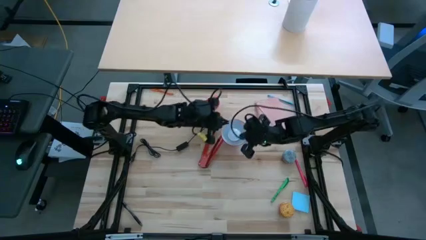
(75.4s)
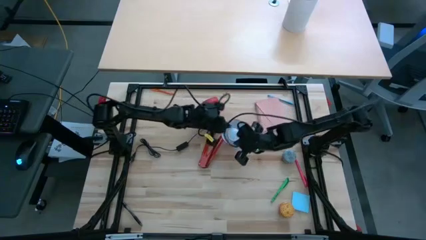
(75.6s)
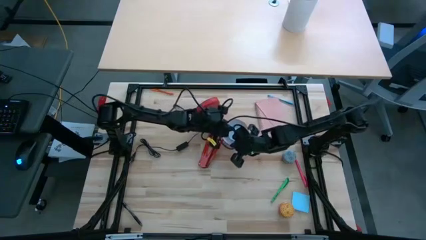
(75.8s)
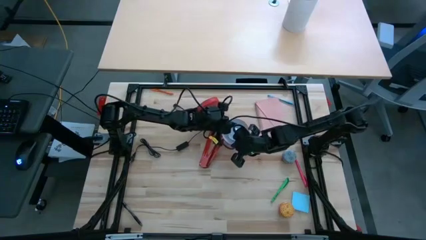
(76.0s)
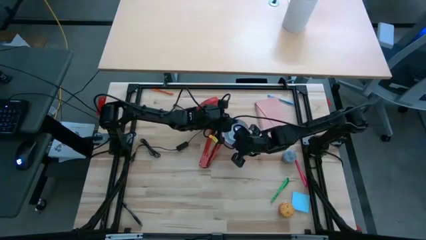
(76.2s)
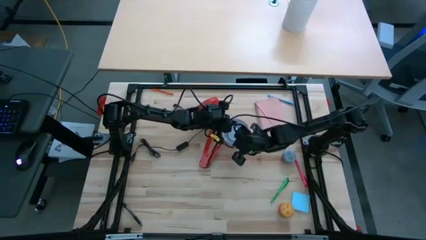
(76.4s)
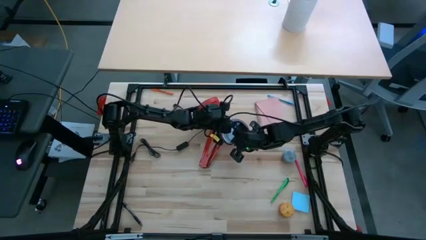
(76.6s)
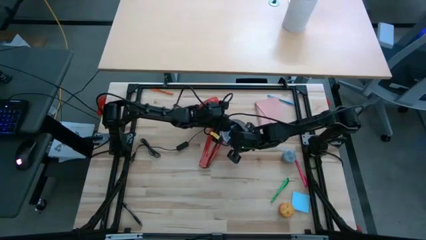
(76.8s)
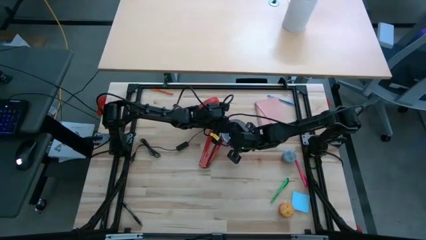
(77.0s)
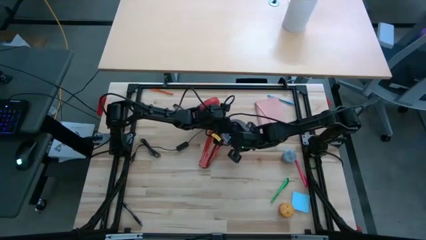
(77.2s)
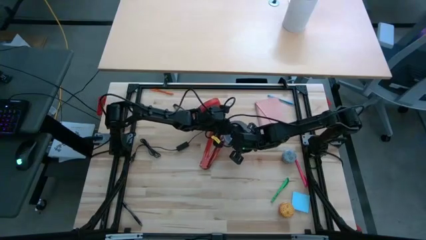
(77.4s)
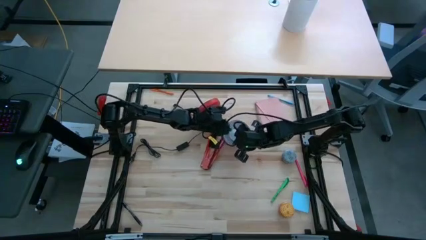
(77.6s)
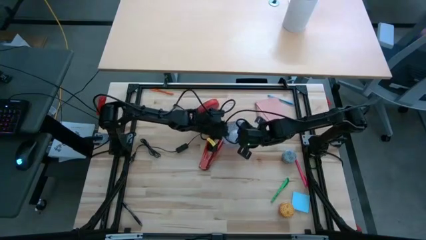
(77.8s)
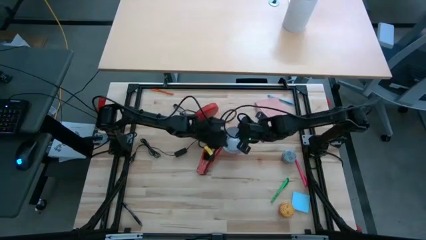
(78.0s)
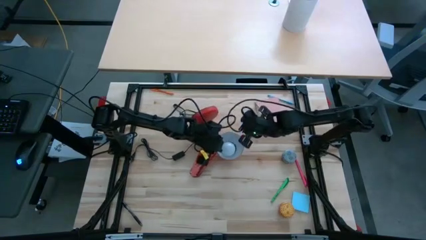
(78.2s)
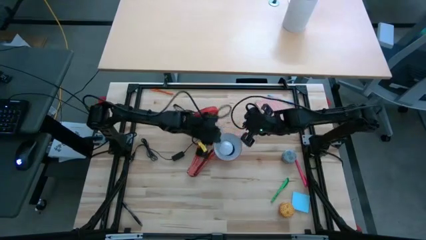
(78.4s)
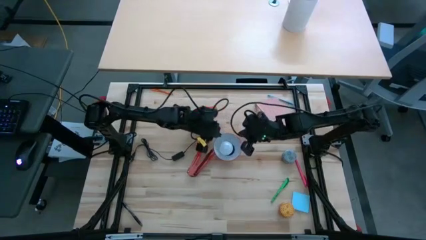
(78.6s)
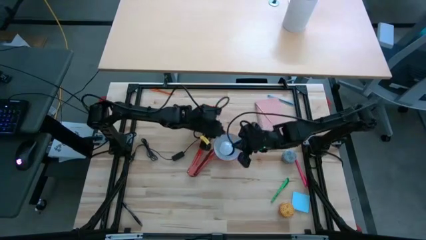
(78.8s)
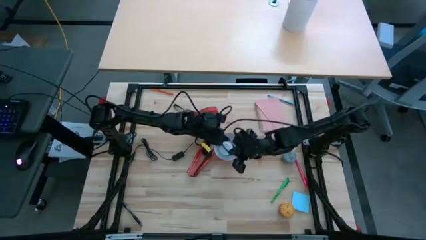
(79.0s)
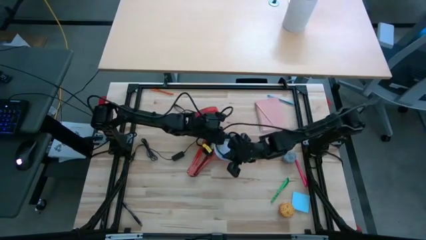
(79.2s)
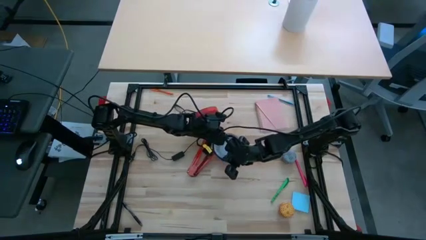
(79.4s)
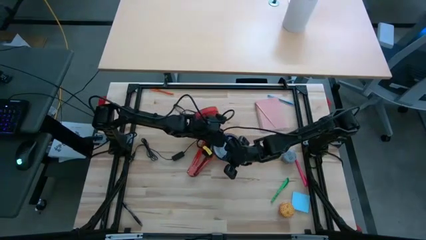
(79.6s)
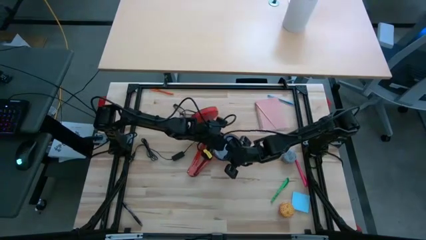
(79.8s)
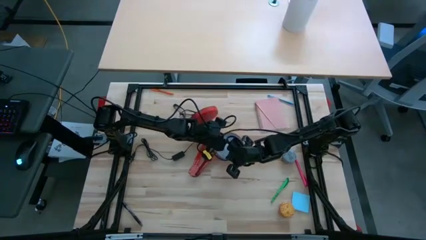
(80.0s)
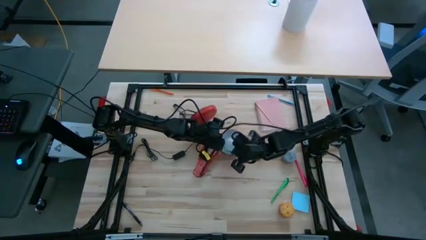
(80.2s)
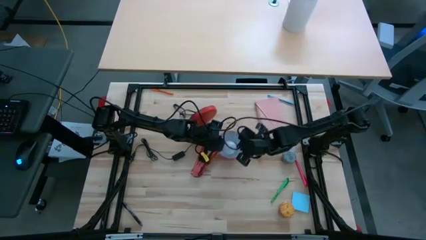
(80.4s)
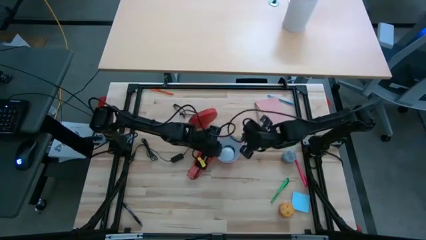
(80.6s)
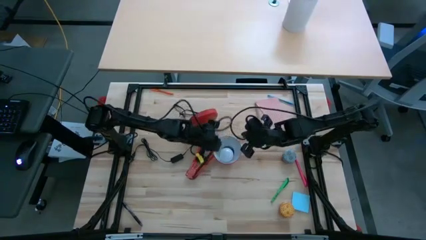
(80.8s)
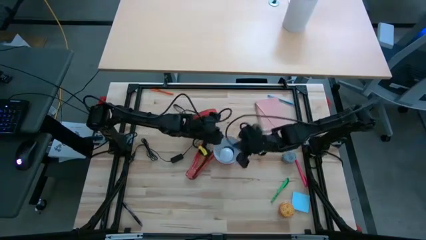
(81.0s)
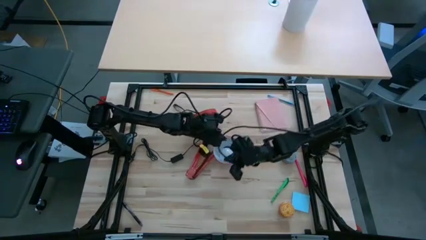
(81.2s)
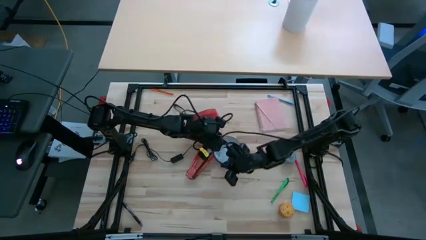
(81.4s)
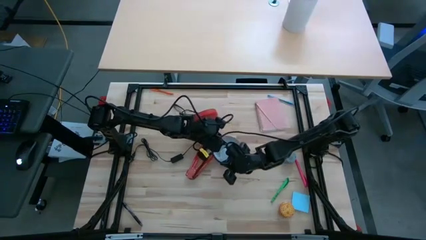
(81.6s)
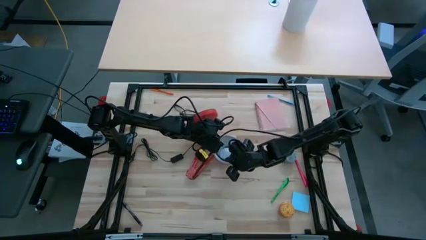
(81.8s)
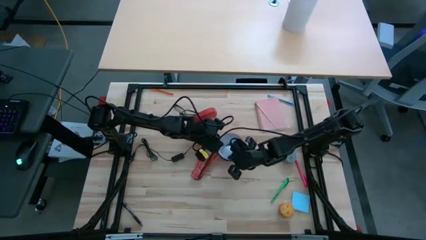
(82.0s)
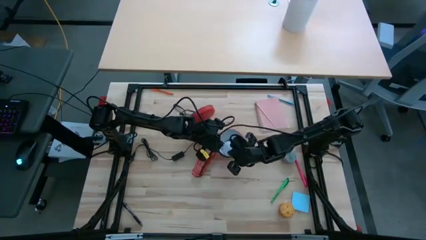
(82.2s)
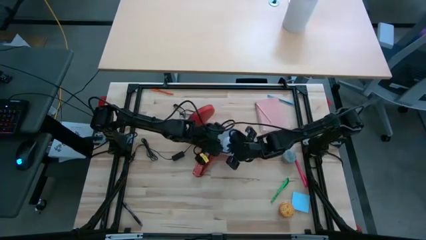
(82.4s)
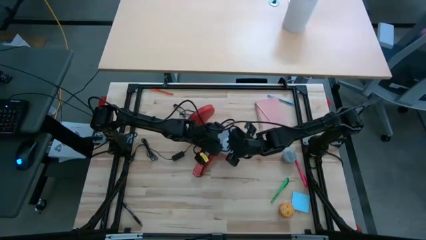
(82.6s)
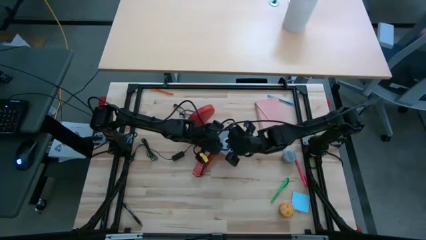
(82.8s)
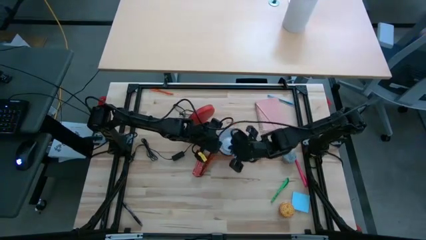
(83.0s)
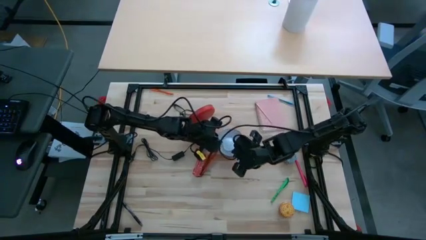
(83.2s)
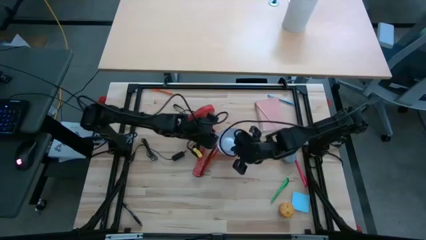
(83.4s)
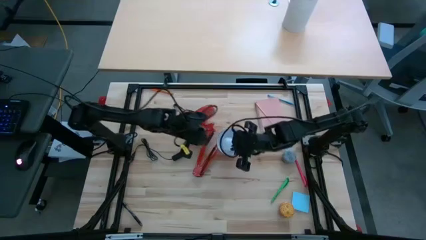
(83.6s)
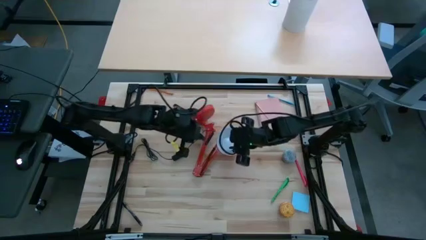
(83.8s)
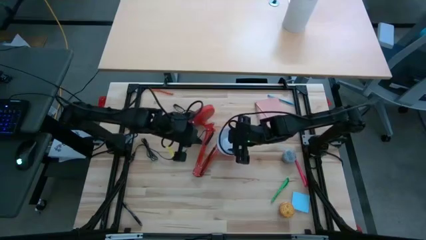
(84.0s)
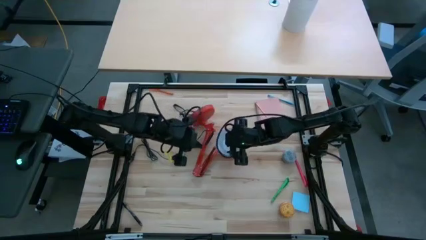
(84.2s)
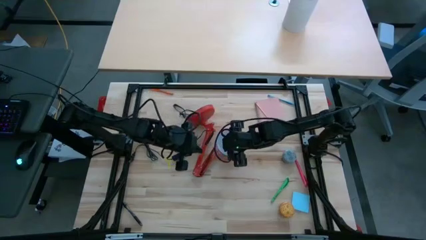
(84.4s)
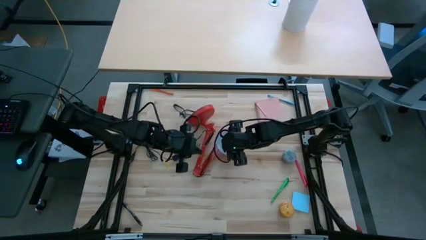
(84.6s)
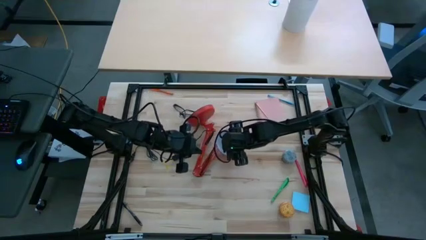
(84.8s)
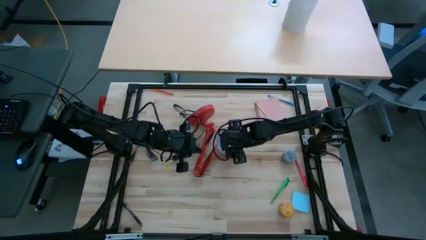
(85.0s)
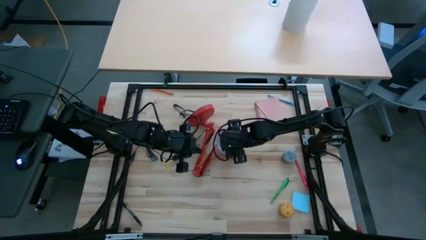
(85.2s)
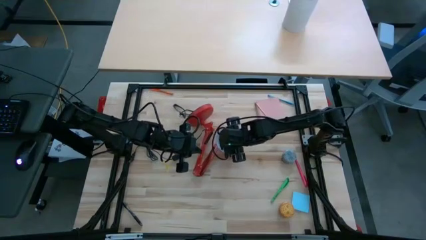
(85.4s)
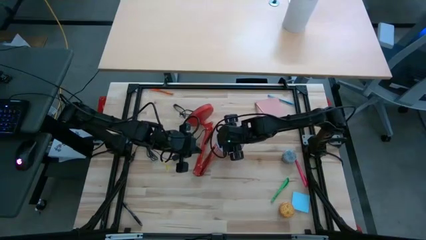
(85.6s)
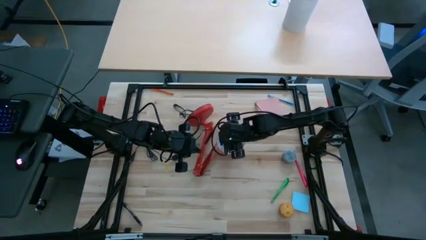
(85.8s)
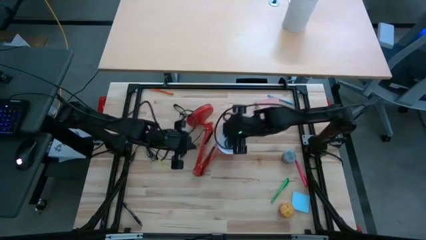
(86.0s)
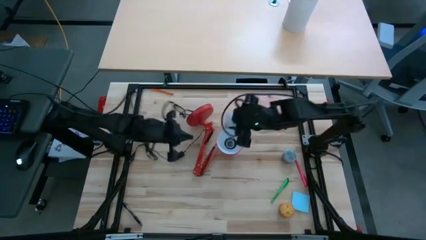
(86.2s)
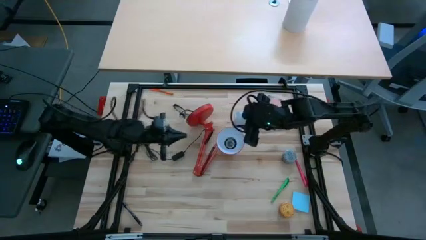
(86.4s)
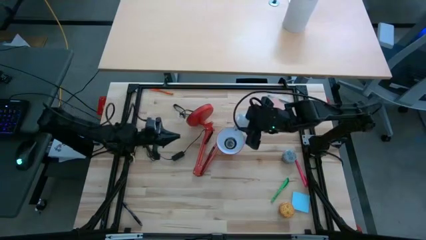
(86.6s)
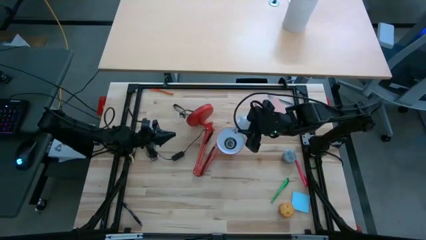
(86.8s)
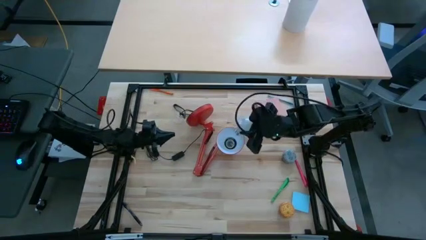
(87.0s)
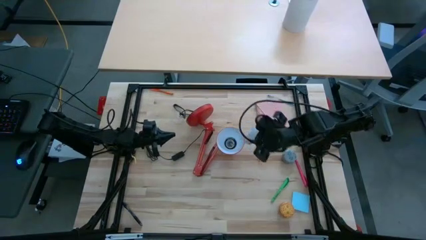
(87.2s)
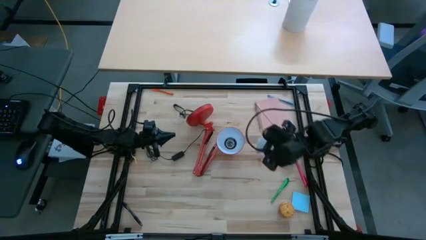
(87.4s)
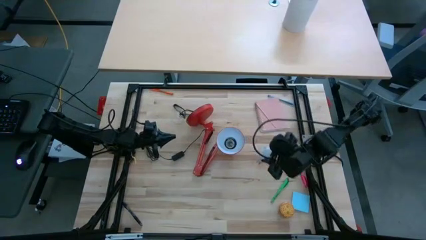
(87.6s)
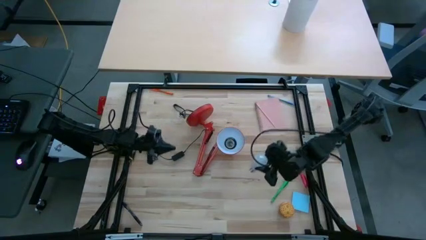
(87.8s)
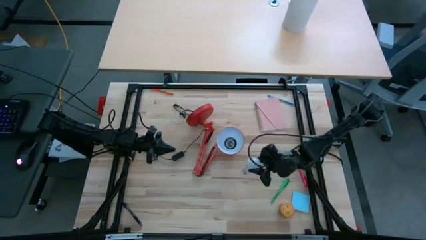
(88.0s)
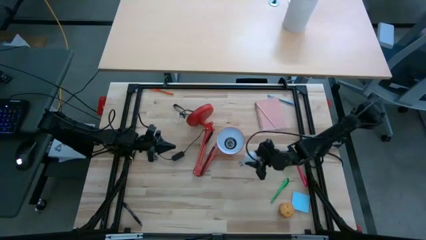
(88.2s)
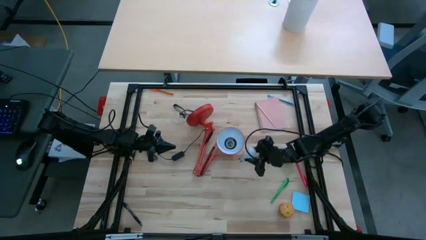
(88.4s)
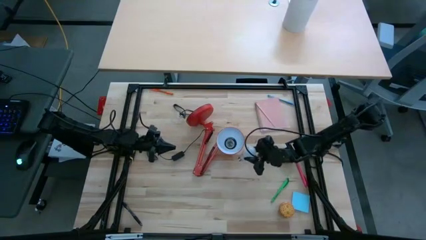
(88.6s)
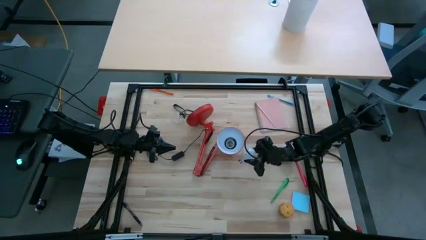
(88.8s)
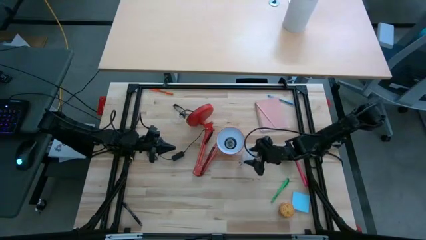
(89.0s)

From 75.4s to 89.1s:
Task: Screw lightbulb
Remove the lightbulb from the lamp
